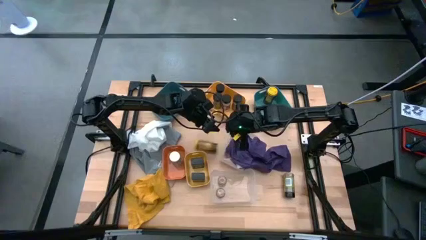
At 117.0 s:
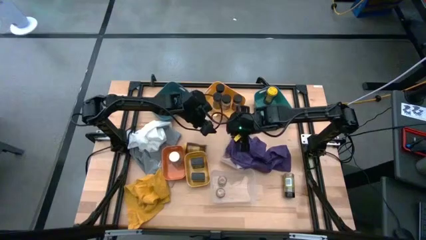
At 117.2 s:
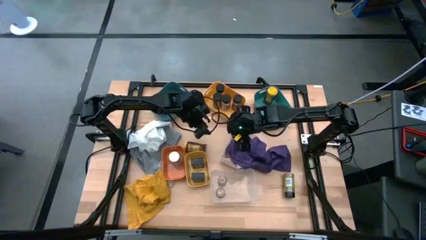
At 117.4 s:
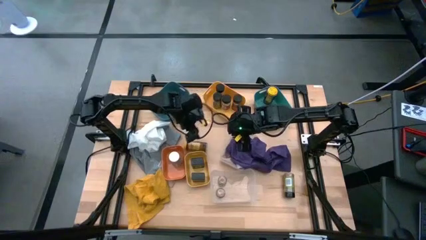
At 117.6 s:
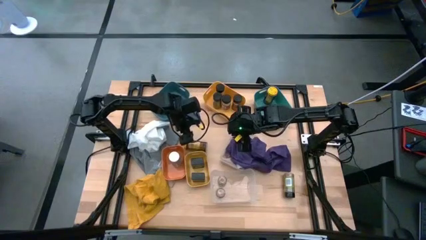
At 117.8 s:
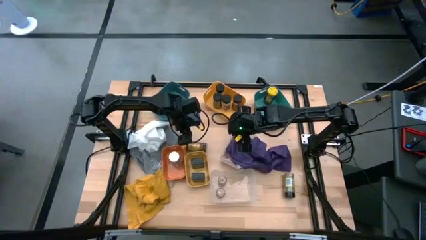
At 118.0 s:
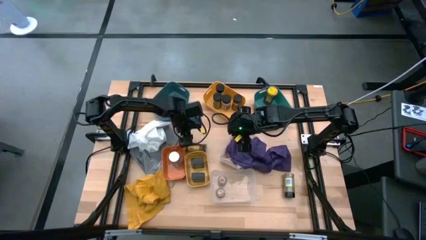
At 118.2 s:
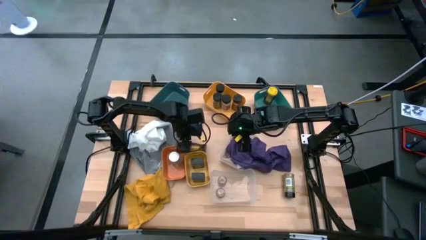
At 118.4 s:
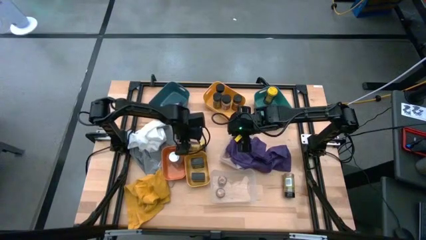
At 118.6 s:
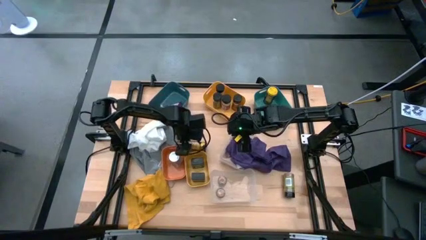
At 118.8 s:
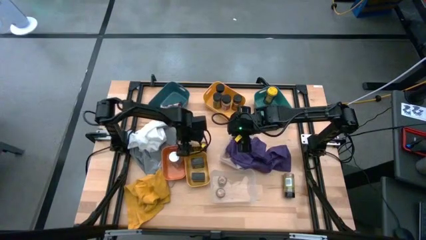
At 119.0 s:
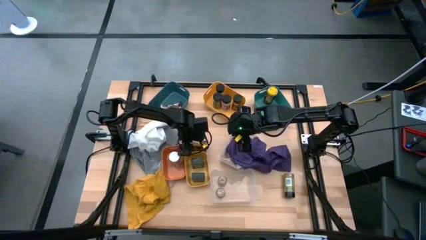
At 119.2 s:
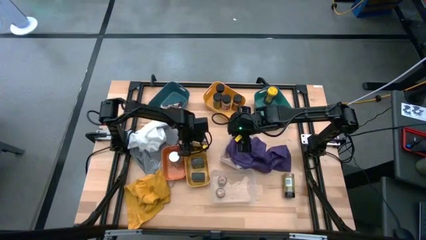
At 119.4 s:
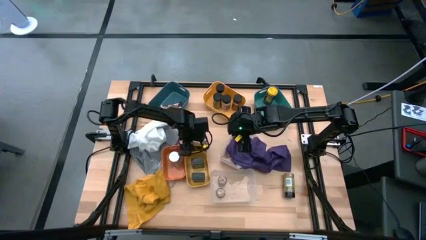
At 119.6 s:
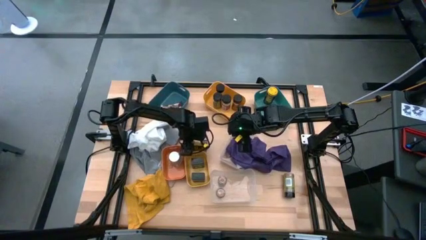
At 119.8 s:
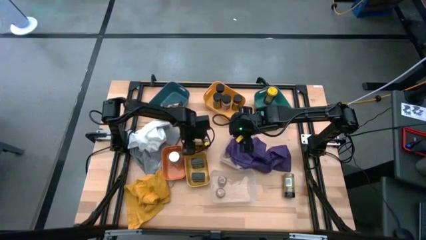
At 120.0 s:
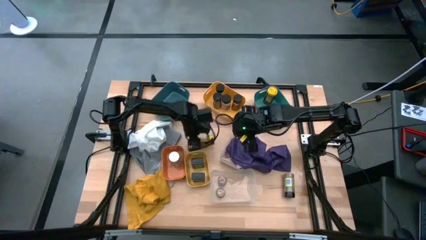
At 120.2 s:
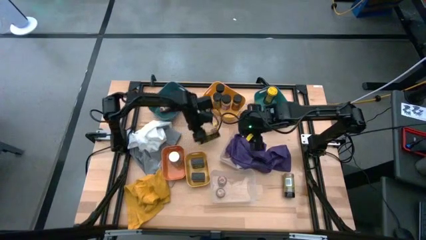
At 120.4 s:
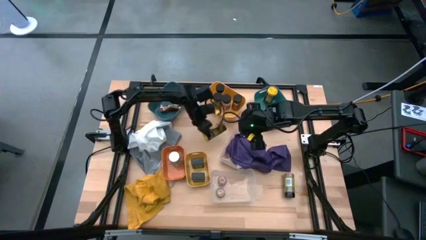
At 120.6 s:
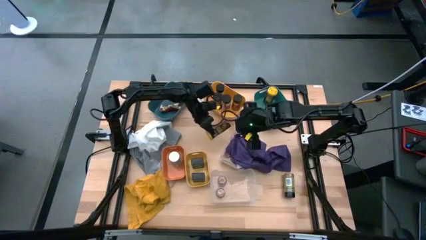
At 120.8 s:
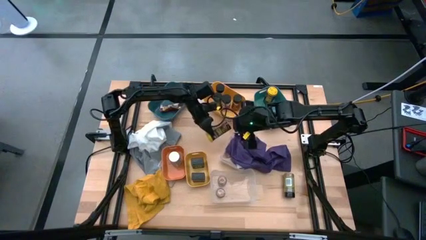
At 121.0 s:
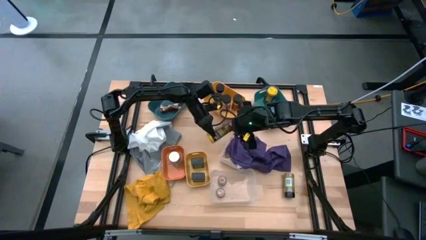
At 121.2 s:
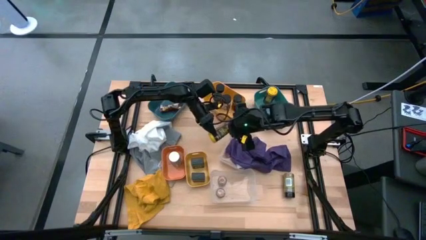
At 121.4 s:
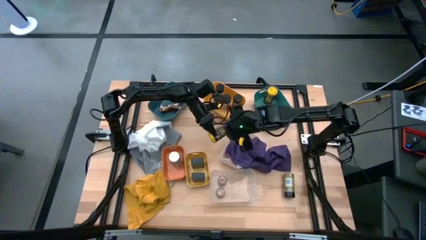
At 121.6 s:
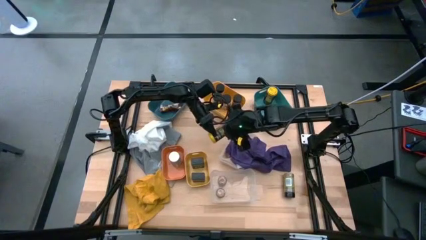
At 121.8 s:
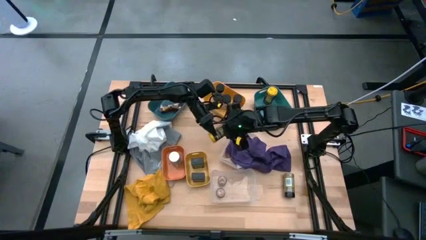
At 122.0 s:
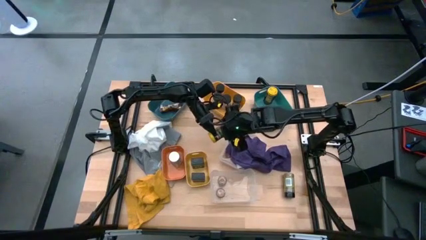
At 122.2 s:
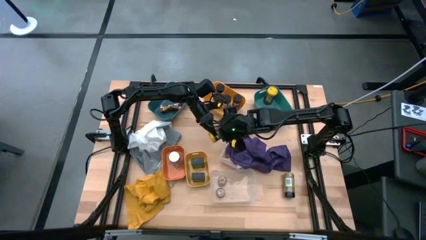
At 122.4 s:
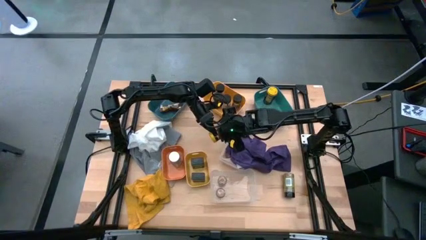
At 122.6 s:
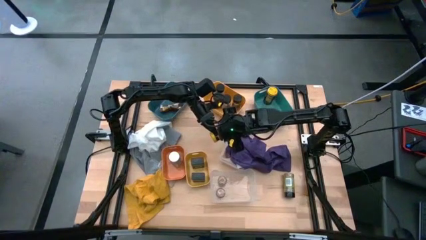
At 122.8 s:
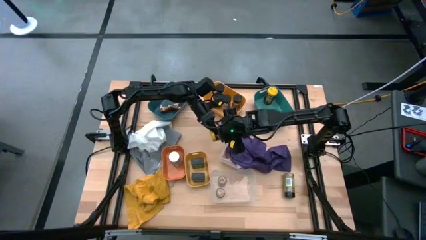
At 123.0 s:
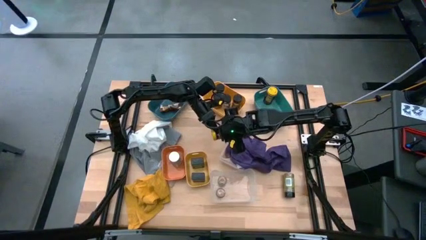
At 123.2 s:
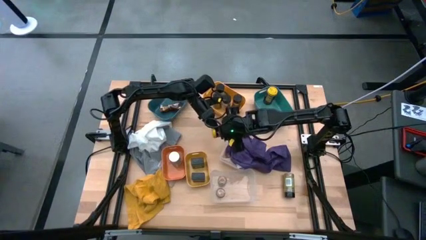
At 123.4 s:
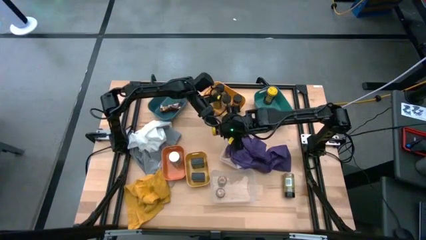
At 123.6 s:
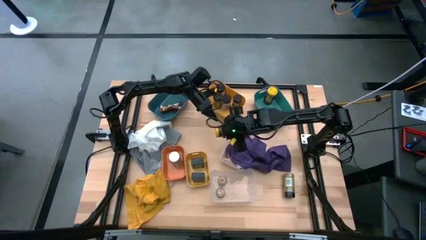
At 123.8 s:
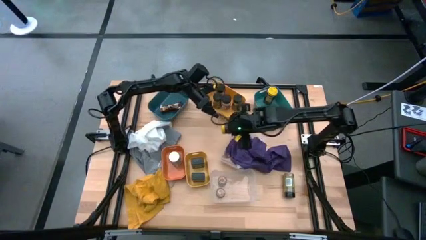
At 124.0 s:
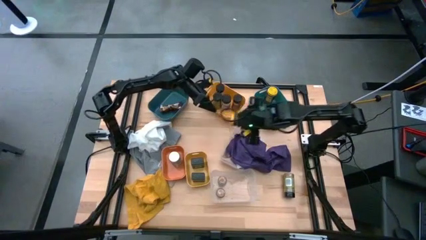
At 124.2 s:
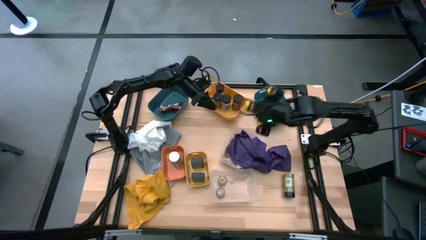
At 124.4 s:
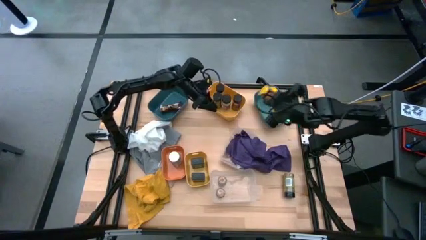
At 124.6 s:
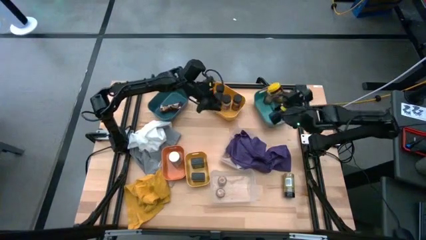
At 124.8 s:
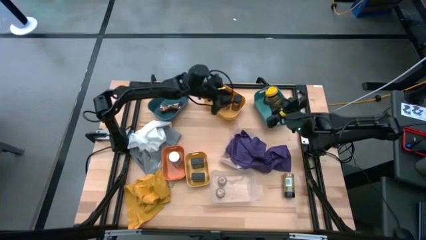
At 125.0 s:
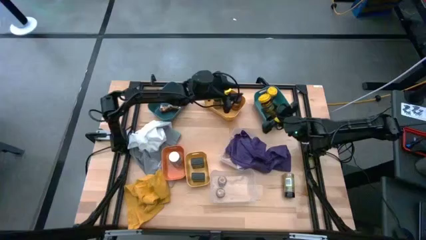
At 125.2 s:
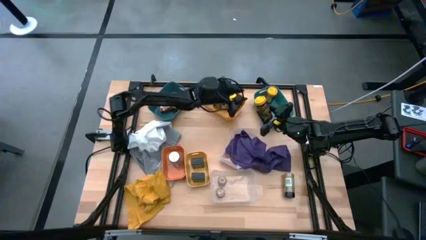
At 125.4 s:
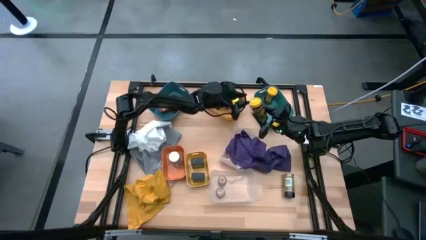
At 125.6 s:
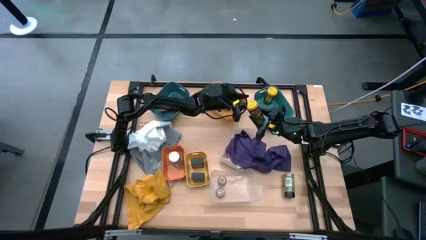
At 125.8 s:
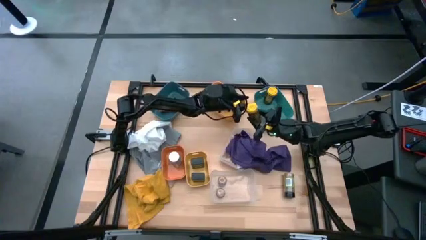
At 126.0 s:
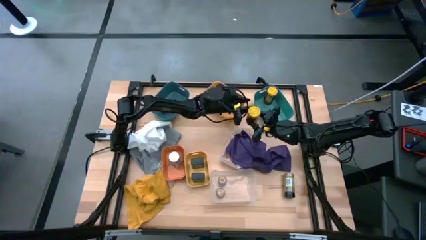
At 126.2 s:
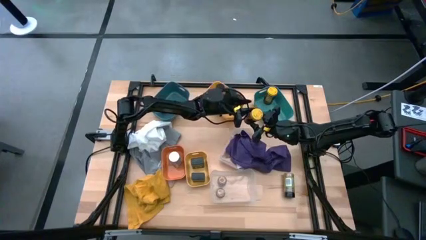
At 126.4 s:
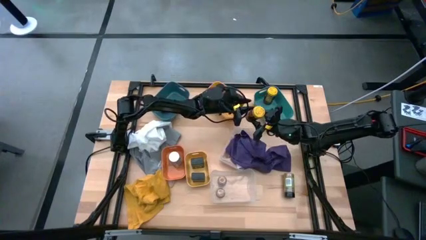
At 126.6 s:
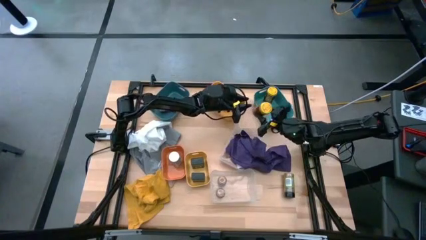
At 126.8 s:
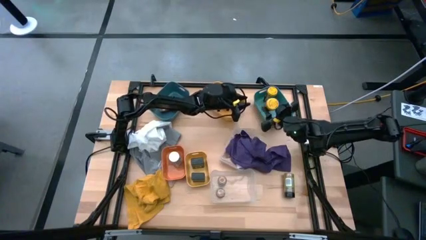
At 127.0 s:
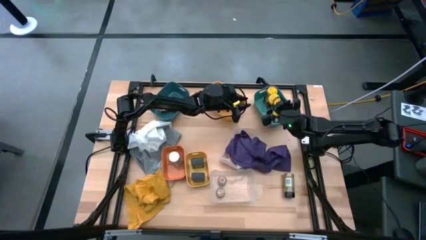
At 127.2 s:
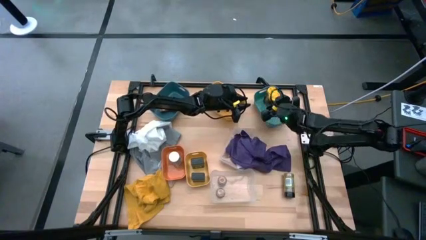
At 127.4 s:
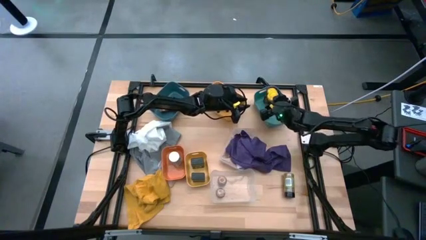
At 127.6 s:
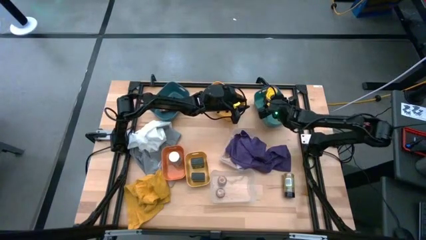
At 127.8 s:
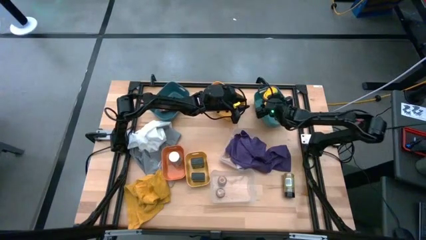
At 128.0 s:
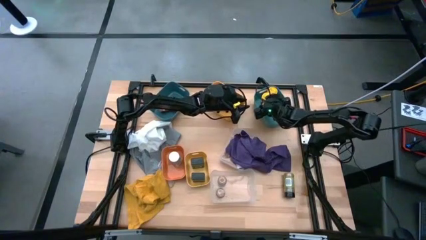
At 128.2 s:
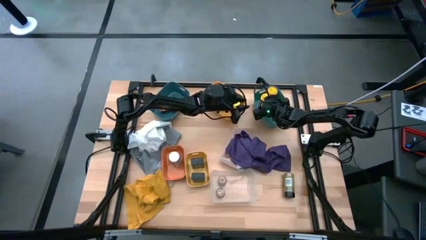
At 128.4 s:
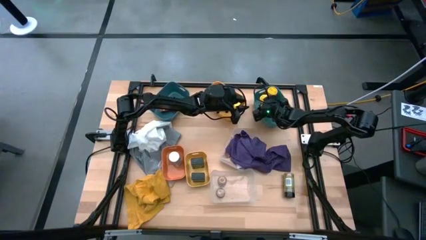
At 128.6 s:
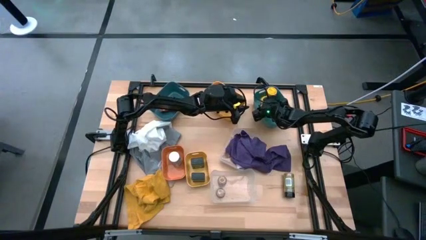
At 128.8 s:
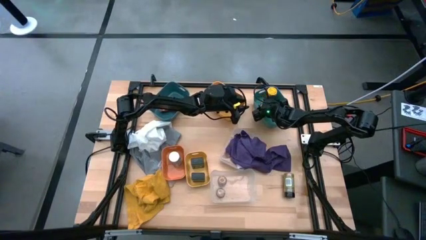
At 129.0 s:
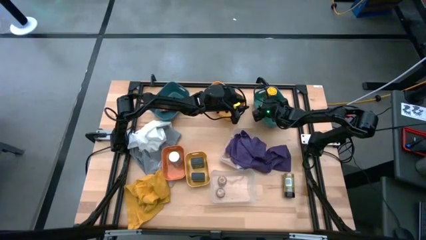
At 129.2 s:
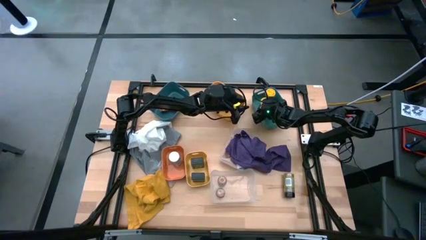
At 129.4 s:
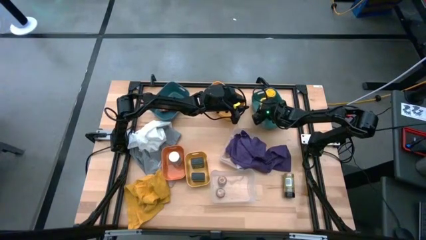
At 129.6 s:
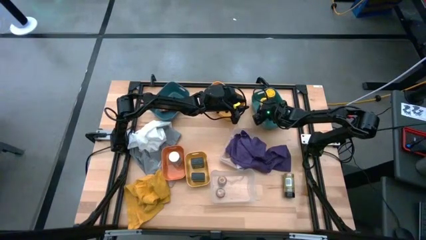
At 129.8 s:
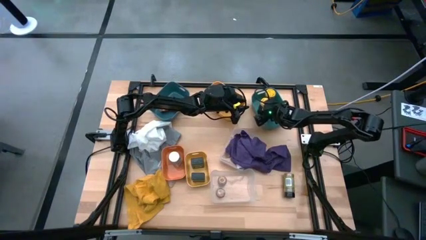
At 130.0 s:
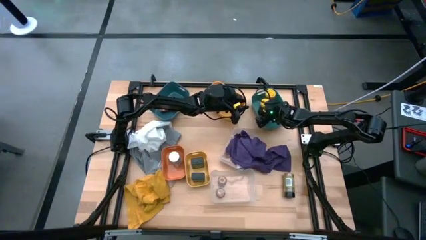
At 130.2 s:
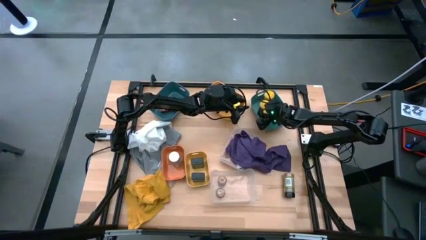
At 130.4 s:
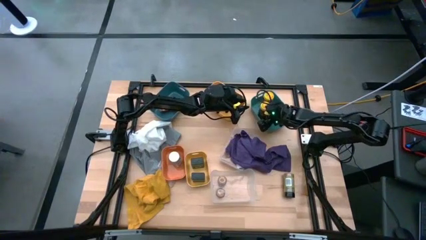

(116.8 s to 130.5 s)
Task: Sort spices by type
Put the yellow spice bottle into the blue bin
